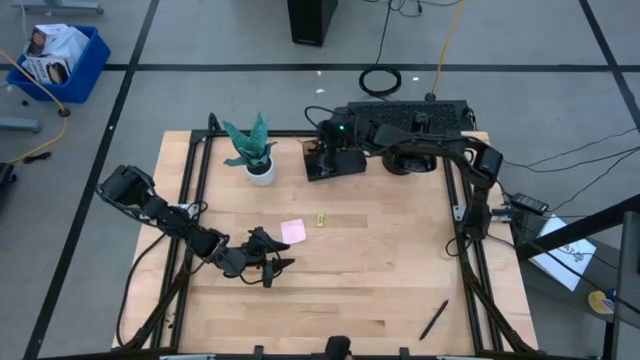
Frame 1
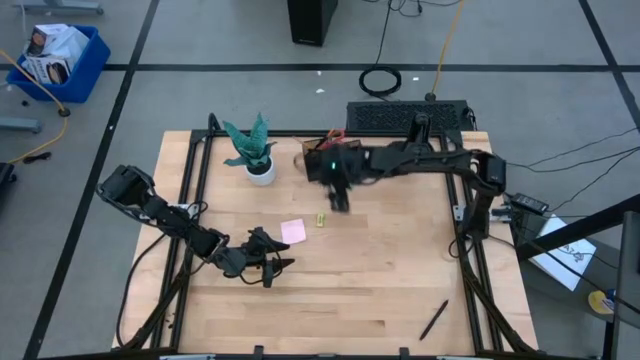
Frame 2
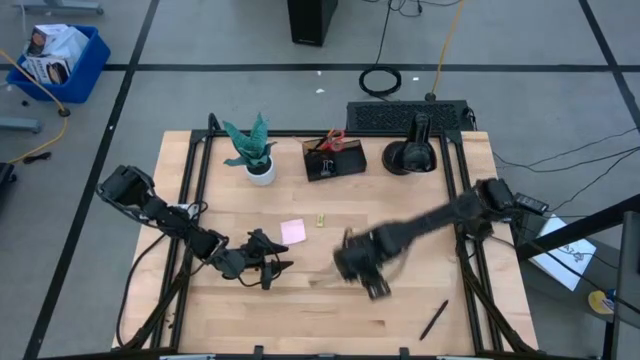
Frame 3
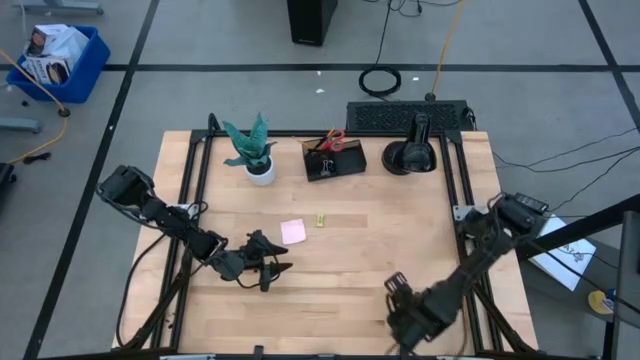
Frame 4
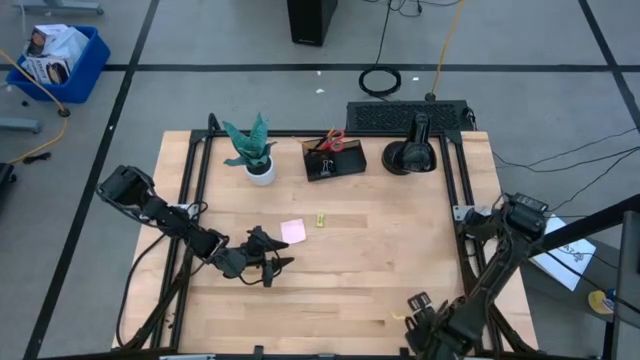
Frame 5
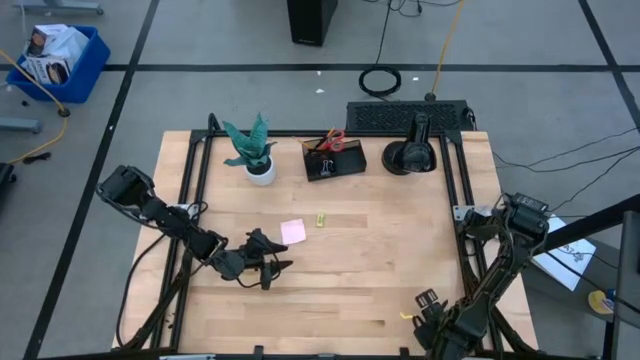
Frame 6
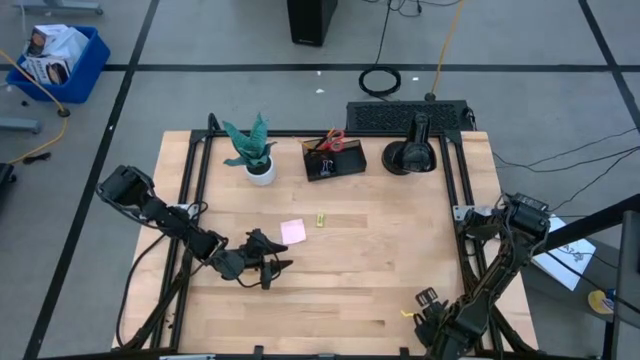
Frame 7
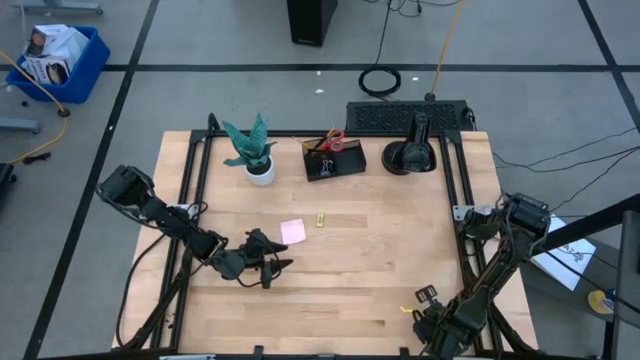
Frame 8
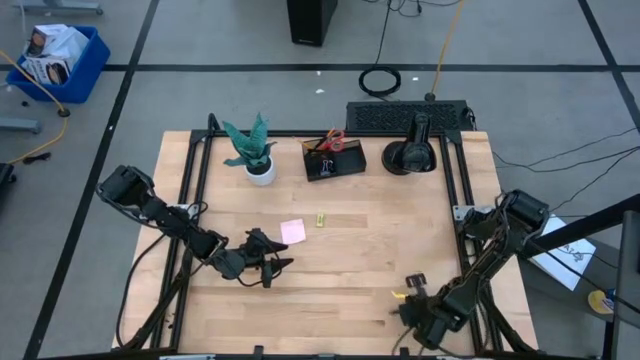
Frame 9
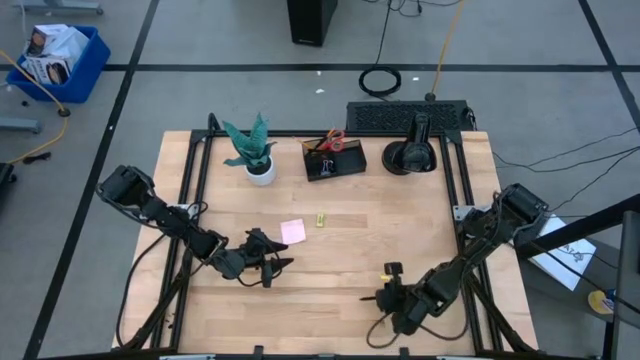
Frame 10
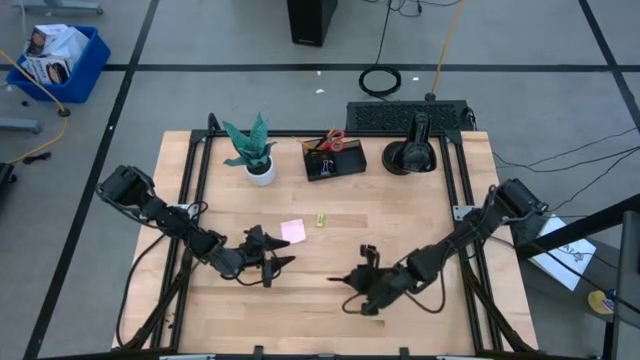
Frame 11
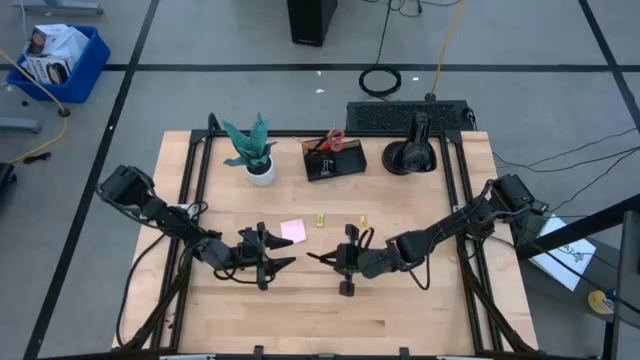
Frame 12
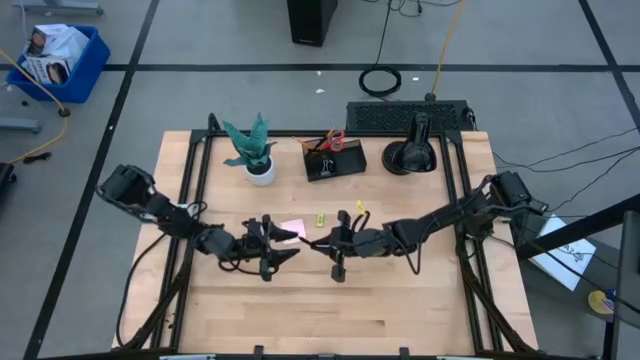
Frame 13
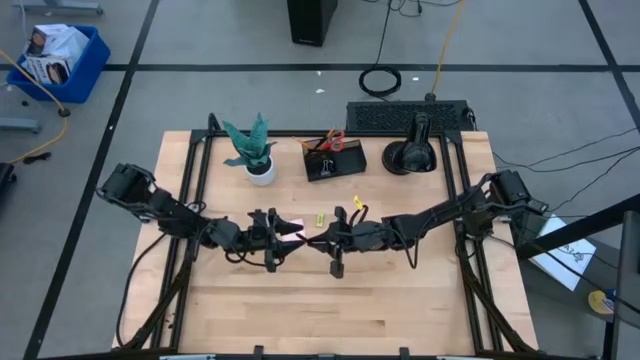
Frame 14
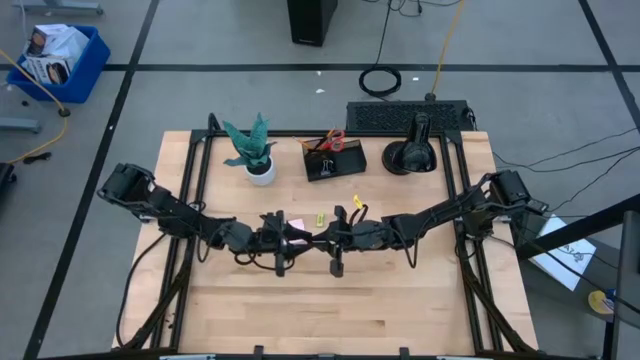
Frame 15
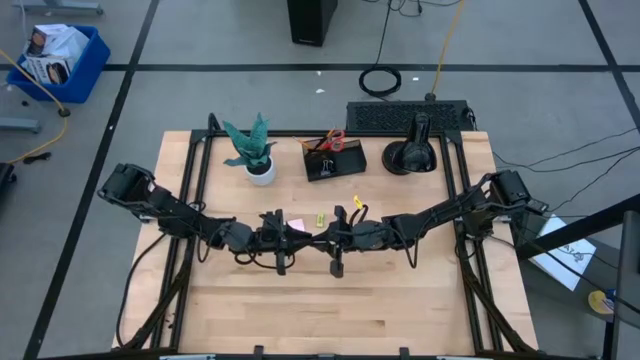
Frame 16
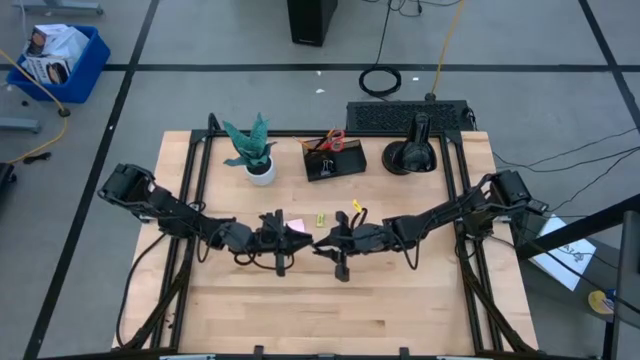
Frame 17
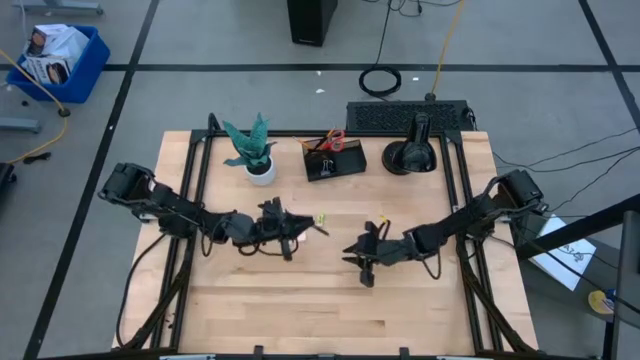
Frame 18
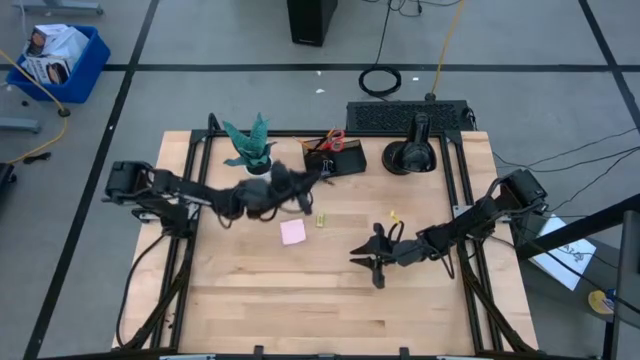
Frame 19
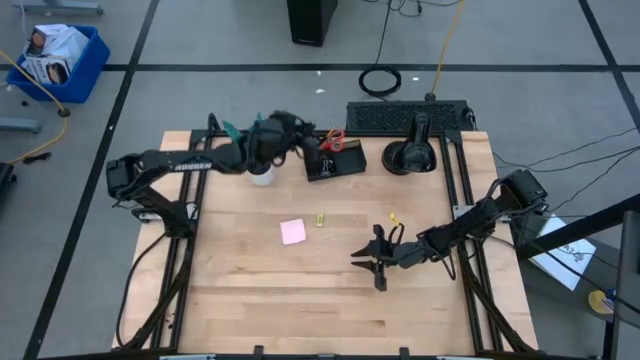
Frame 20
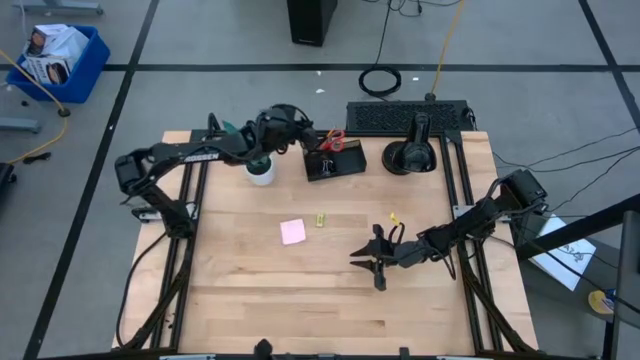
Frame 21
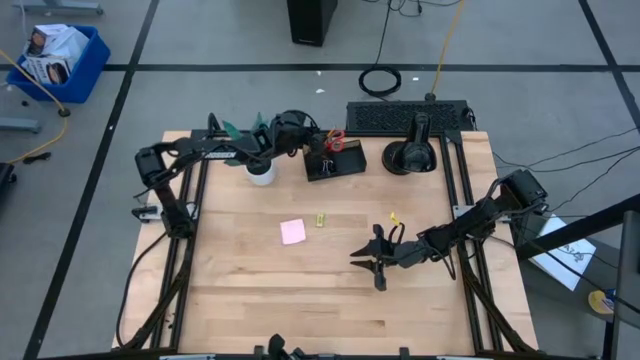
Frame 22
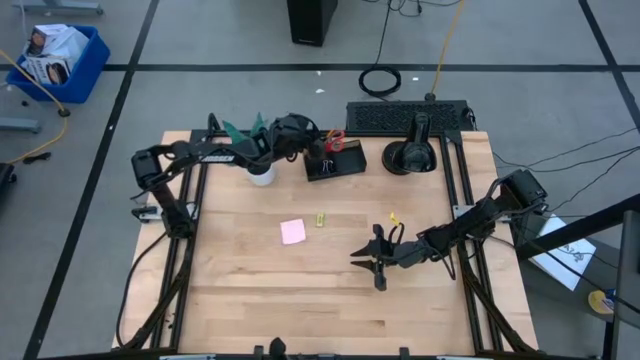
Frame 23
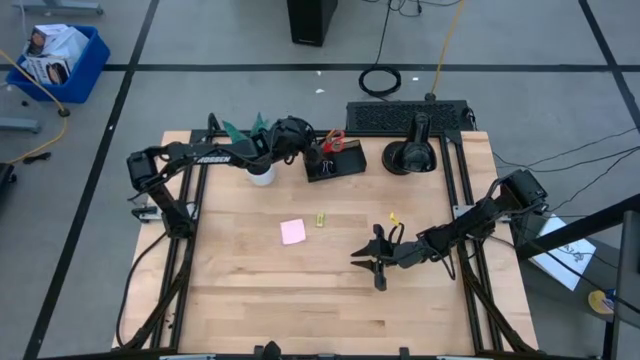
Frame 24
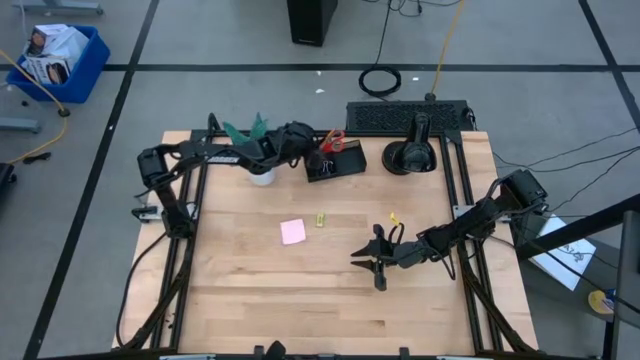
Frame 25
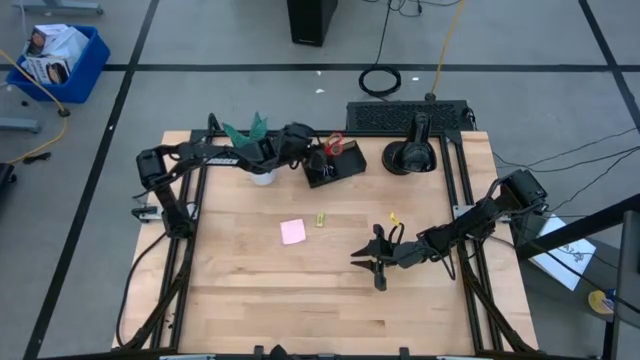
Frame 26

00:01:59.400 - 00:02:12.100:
Task: Pick and place office supplies into organizer
Put the black pen into the black mesh desk organizer

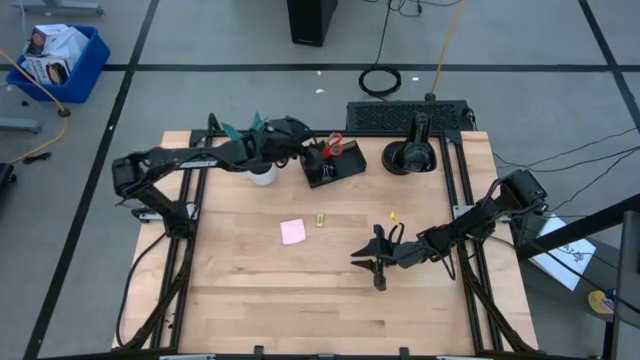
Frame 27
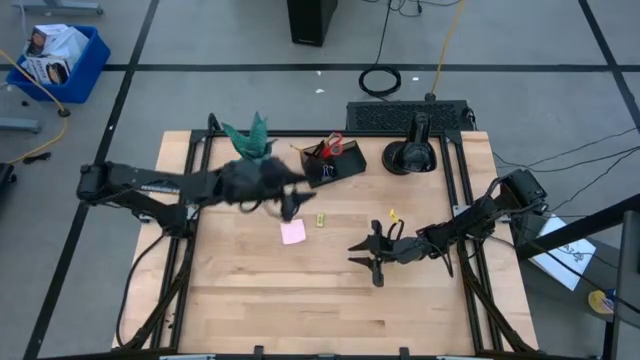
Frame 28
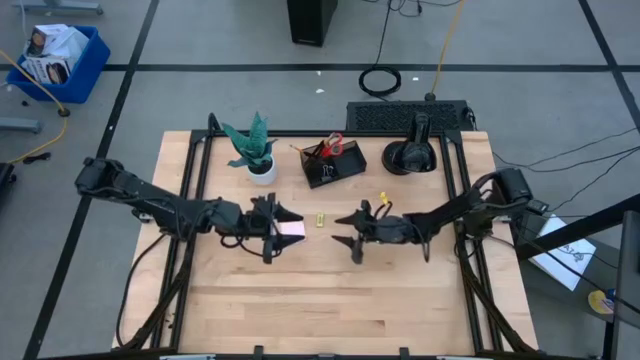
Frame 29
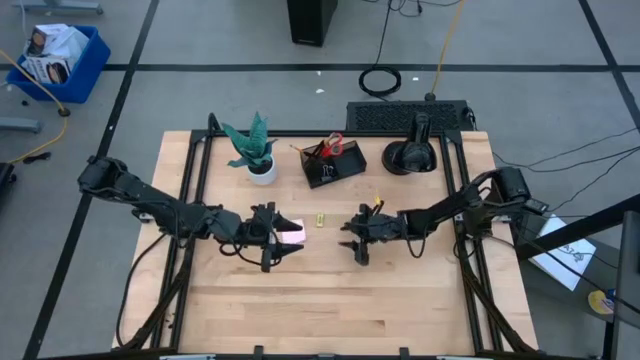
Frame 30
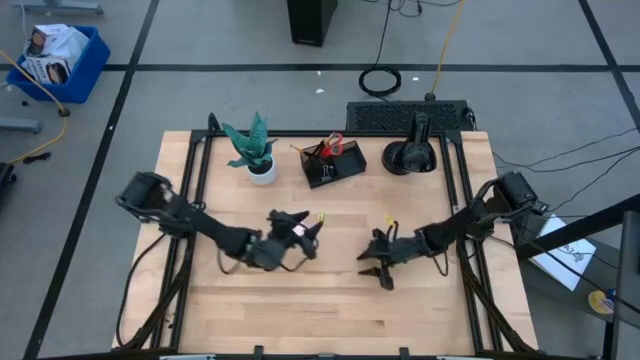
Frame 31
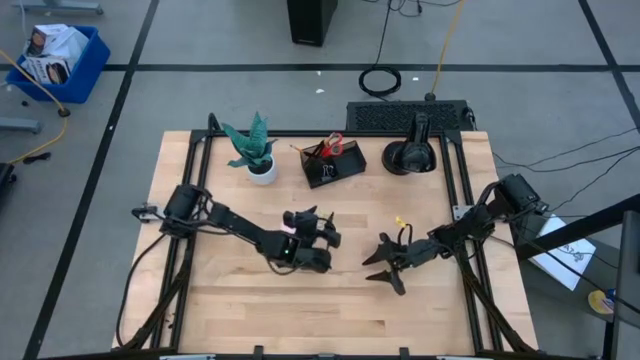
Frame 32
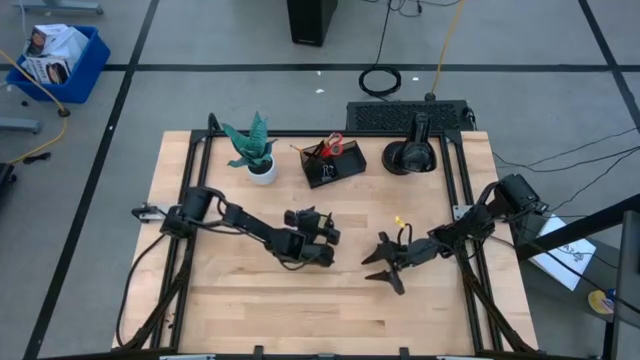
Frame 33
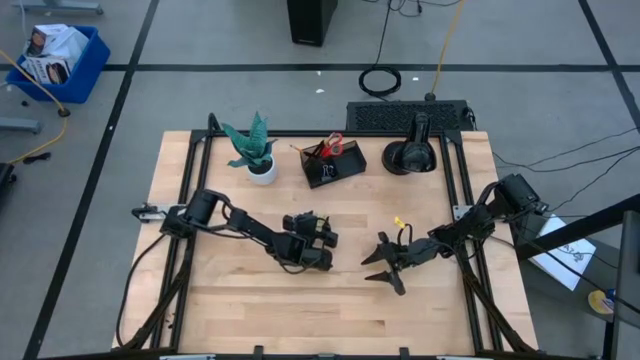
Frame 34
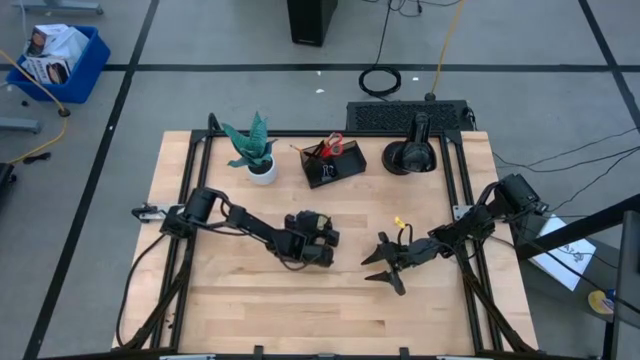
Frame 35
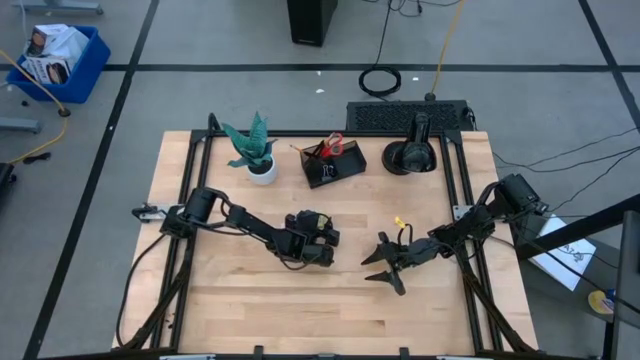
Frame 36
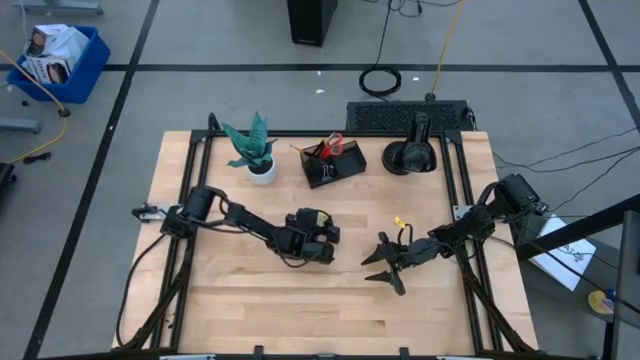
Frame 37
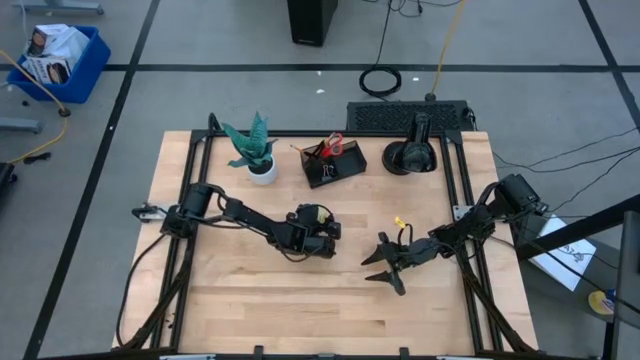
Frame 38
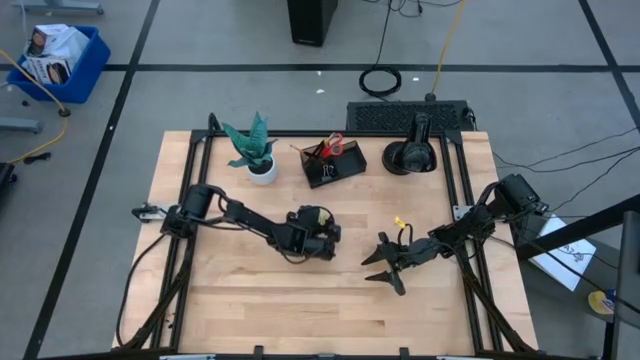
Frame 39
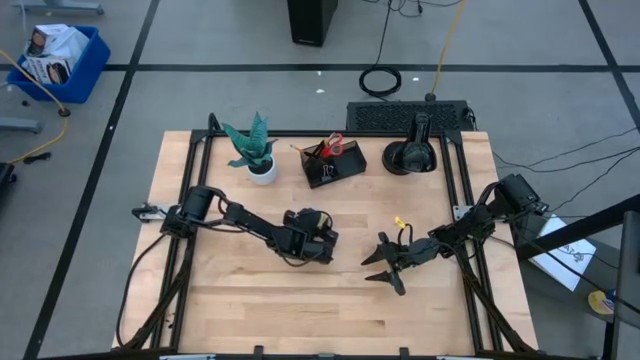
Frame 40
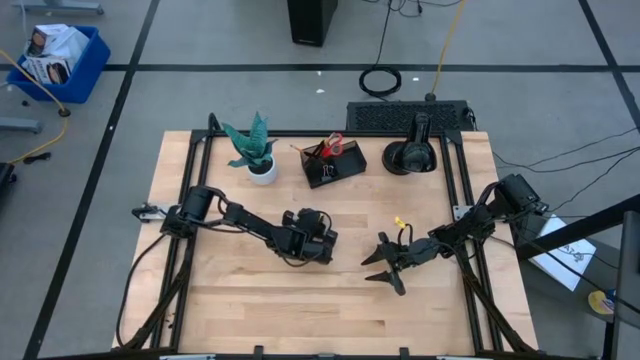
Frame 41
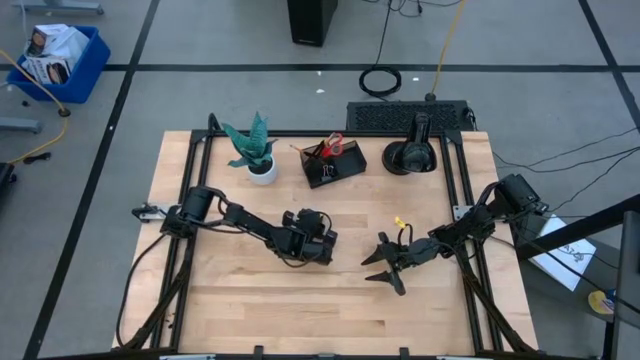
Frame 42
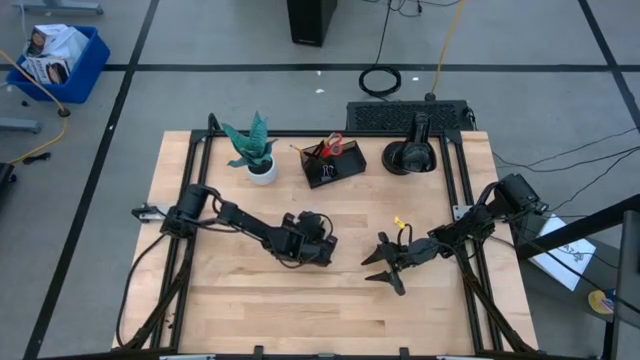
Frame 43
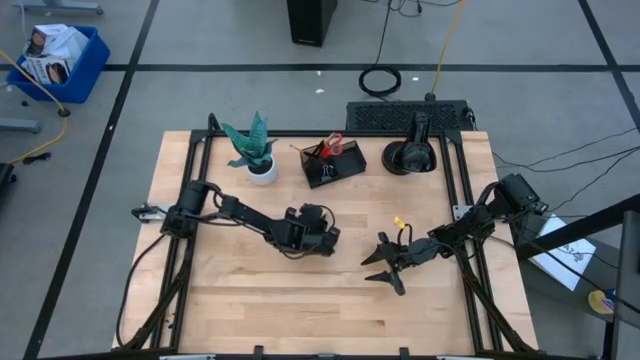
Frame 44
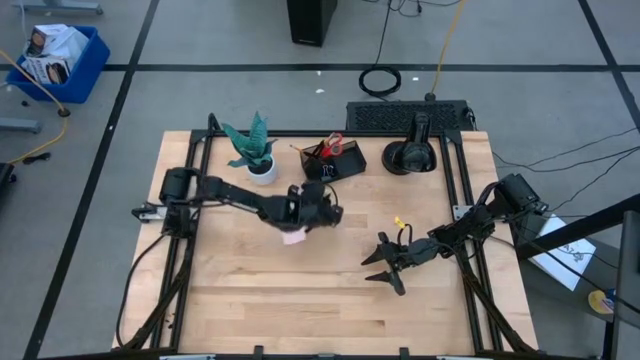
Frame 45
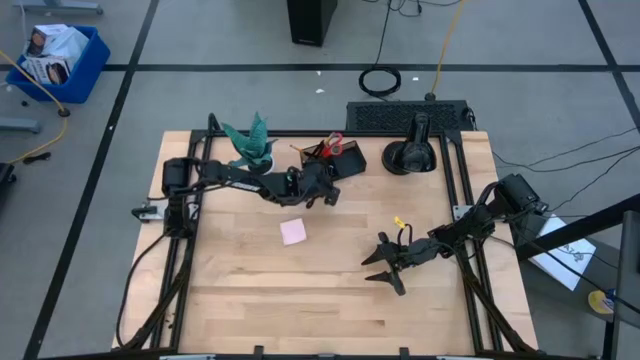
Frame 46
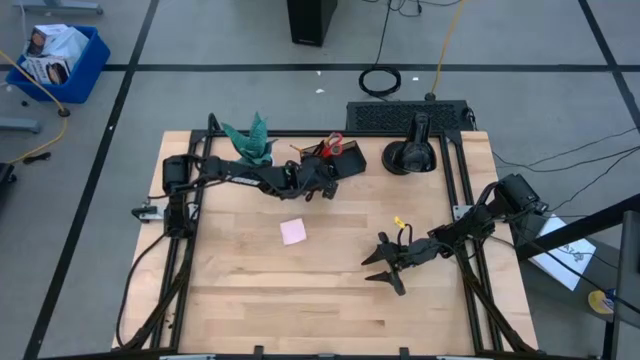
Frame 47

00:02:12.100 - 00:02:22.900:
Put the green eraser into the black mesh desk organizer
